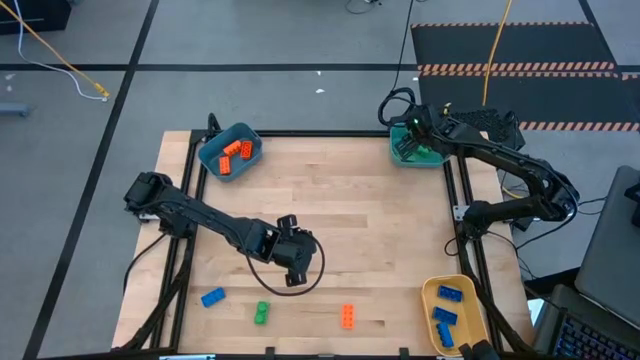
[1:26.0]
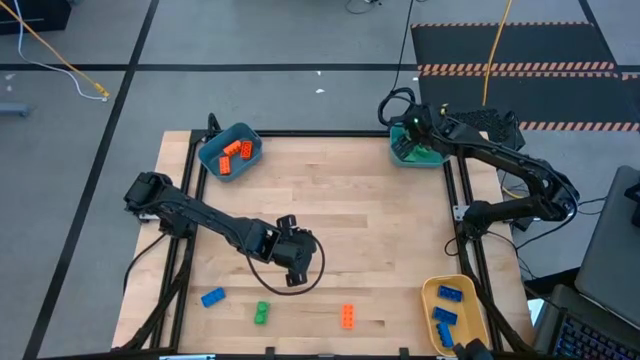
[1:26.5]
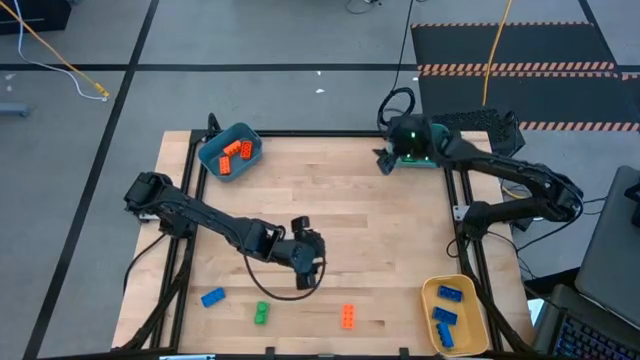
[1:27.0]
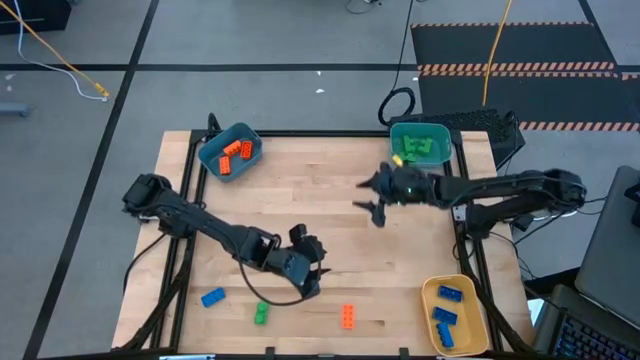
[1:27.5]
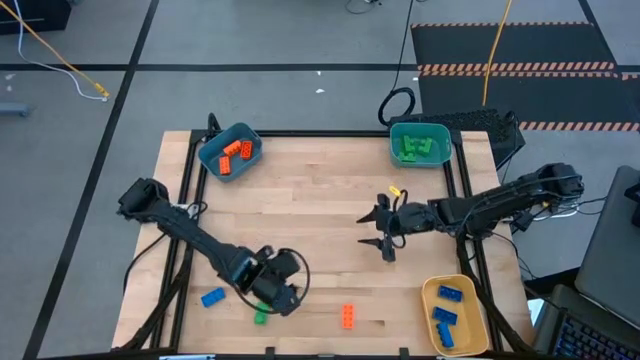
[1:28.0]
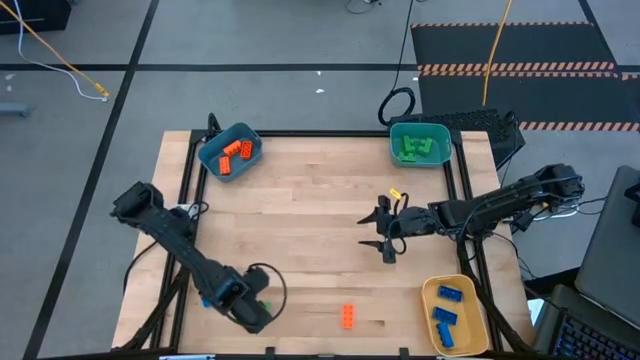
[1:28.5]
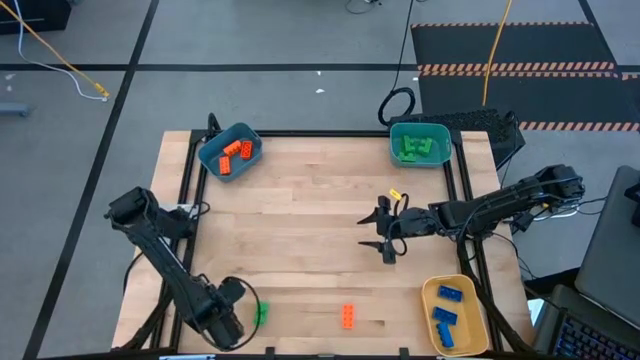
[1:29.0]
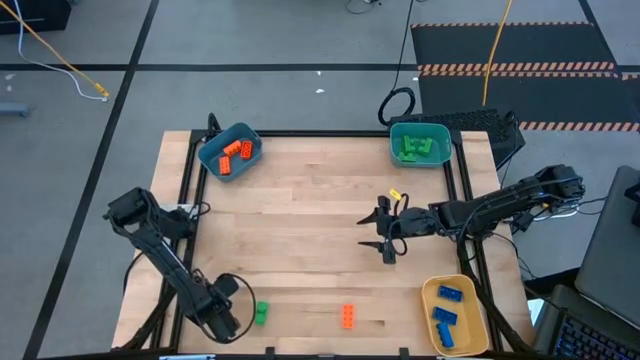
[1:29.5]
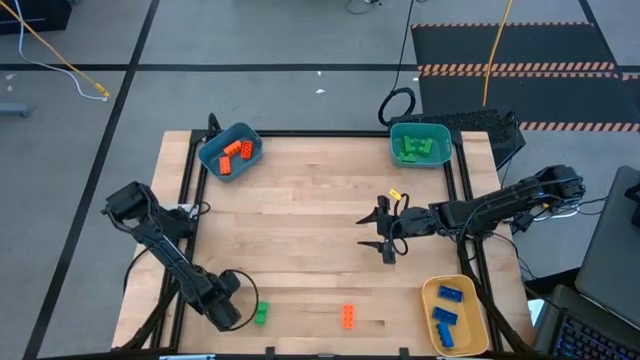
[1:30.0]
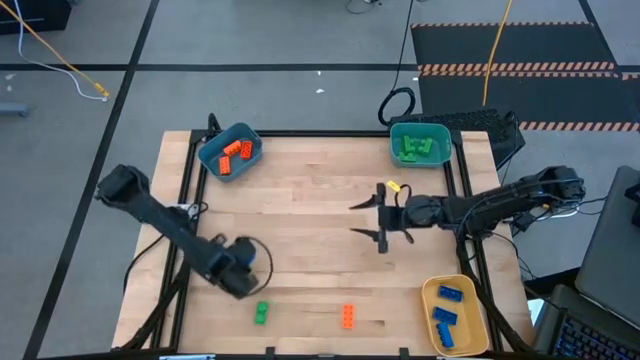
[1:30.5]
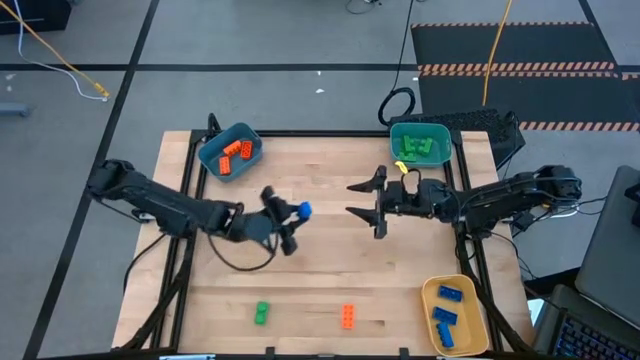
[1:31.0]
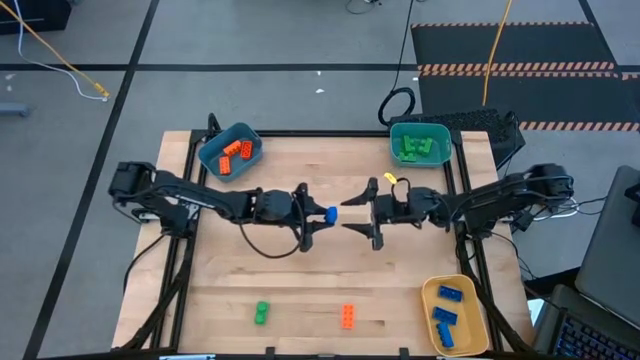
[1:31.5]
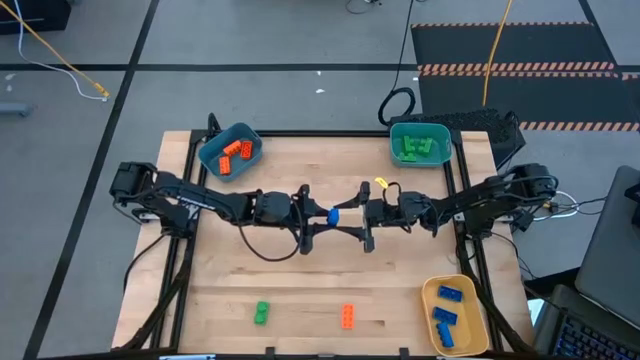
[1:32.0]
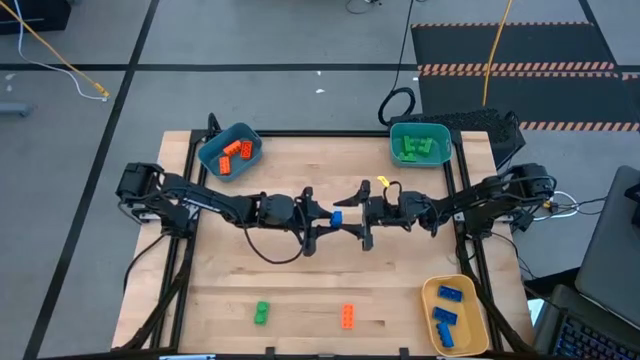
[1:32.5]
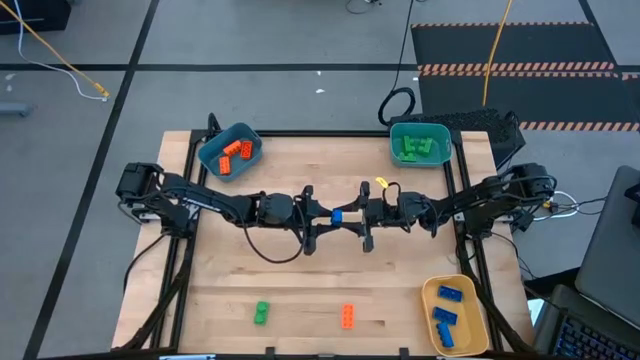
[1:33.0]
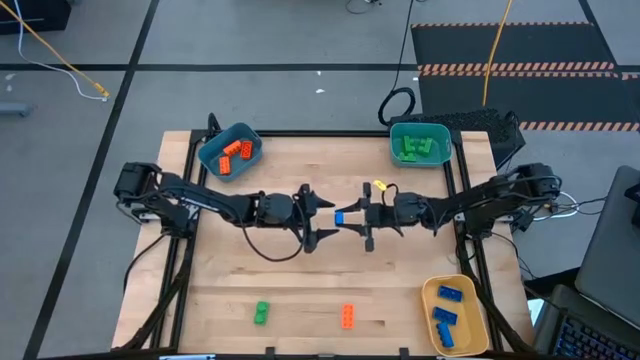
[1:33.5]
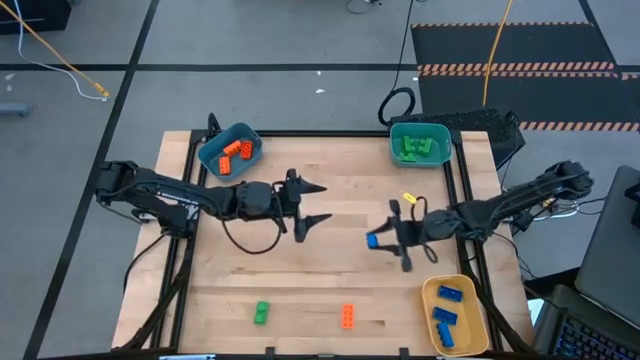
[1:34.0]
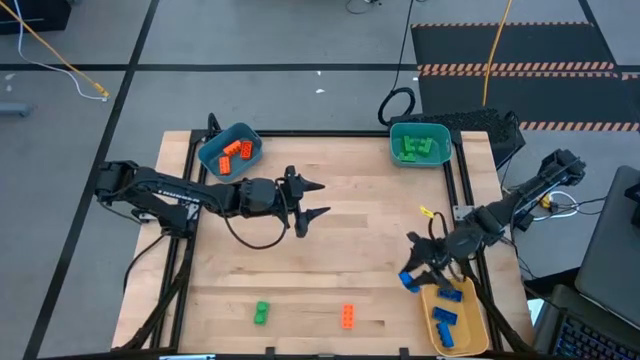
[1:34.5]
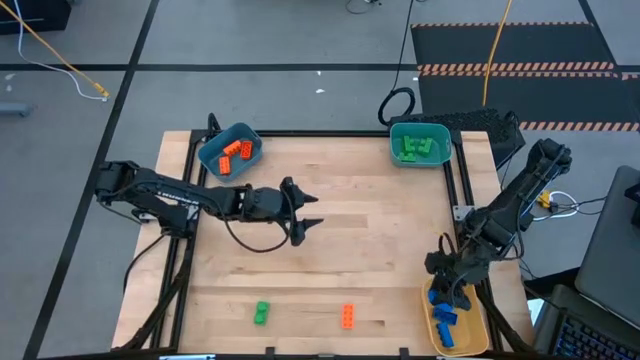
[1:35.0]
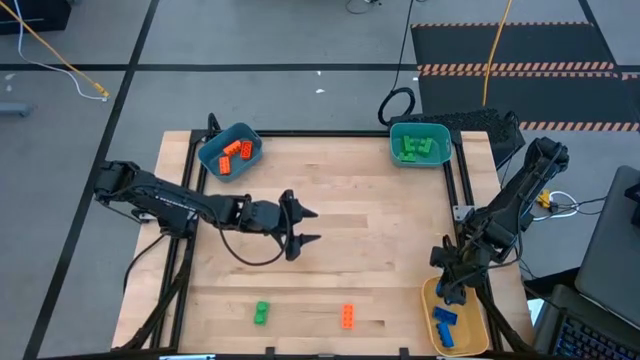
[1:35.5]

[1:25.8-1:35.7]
Task: Sort & place blocks by color
Put the blue game piece into the yellow bin

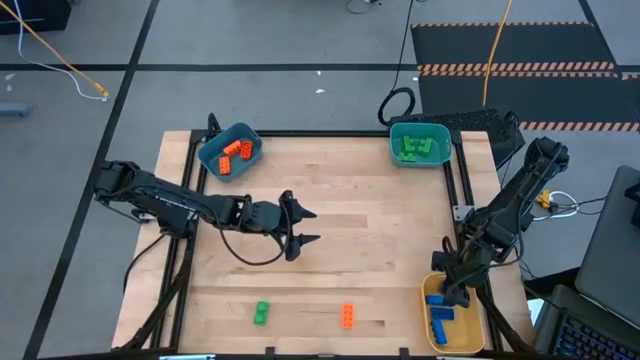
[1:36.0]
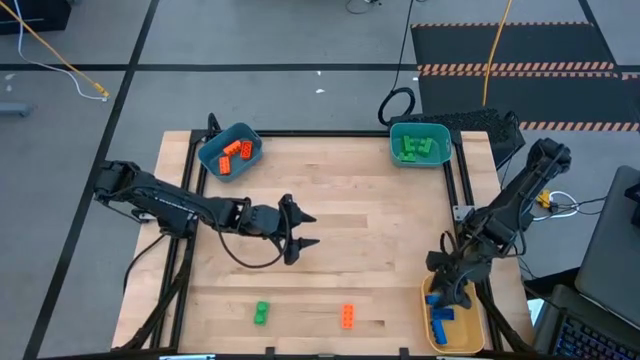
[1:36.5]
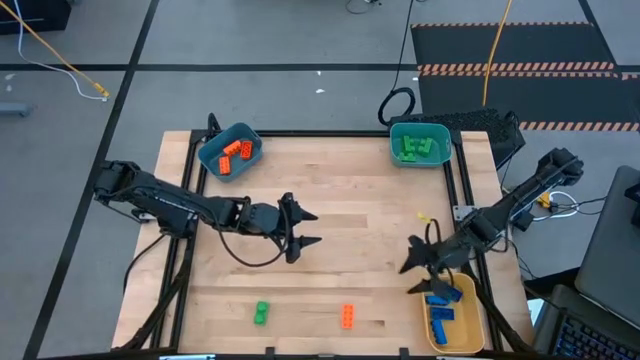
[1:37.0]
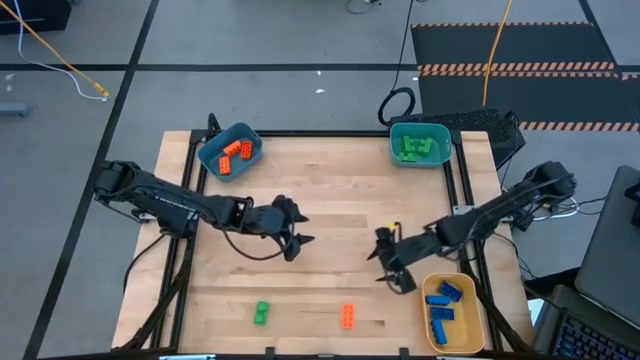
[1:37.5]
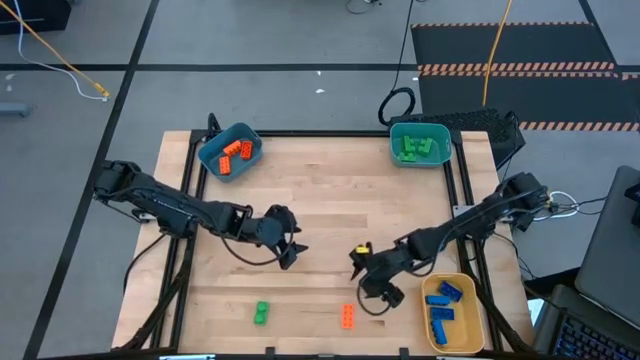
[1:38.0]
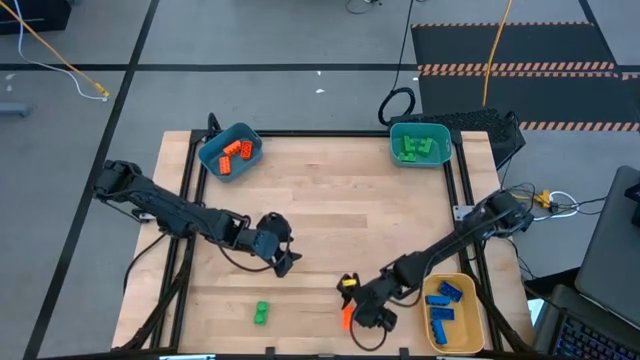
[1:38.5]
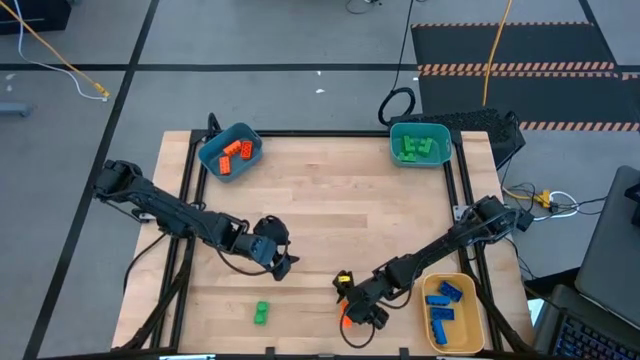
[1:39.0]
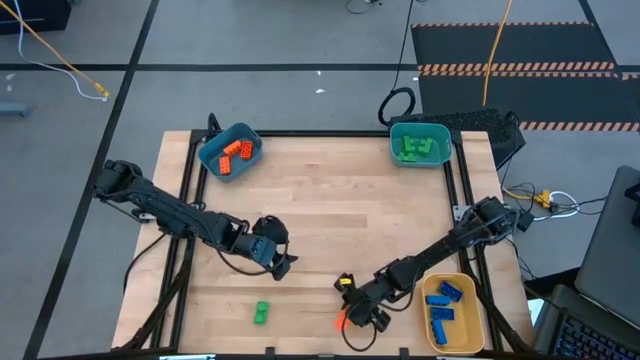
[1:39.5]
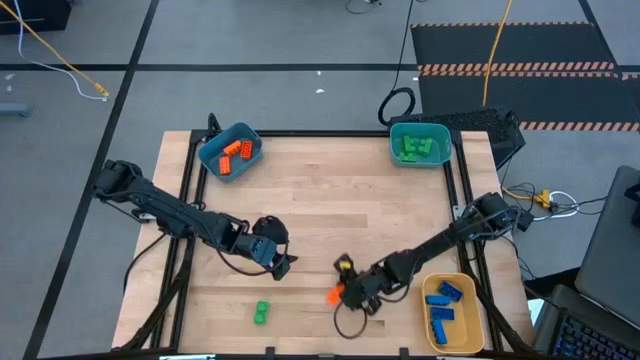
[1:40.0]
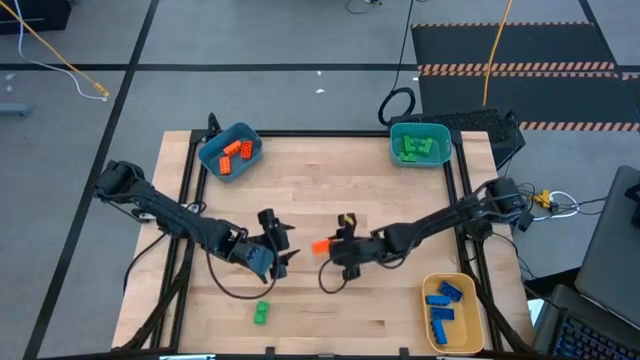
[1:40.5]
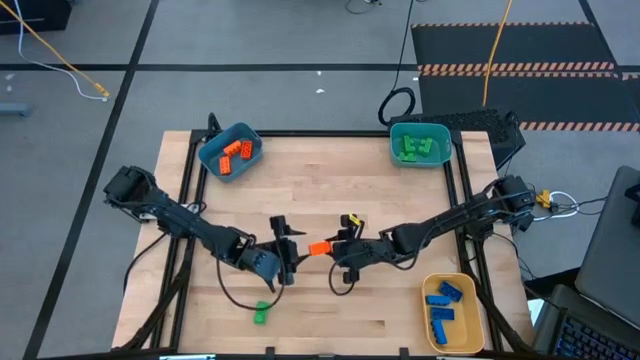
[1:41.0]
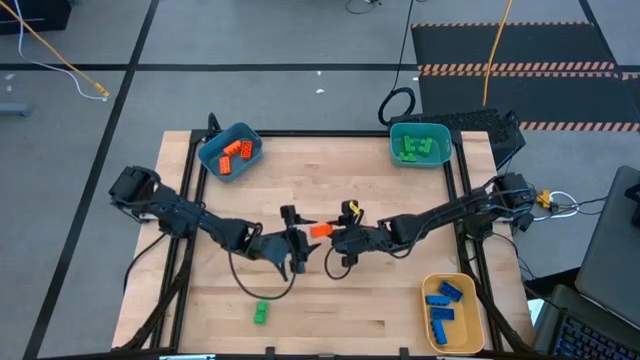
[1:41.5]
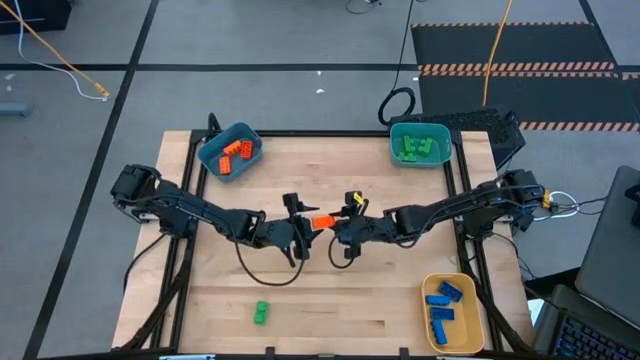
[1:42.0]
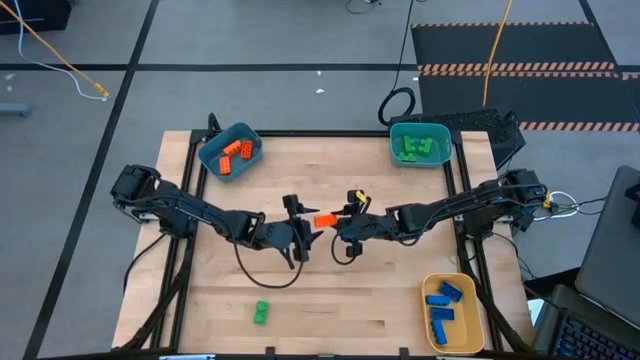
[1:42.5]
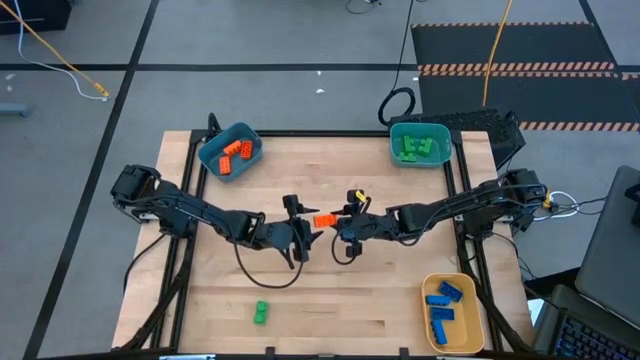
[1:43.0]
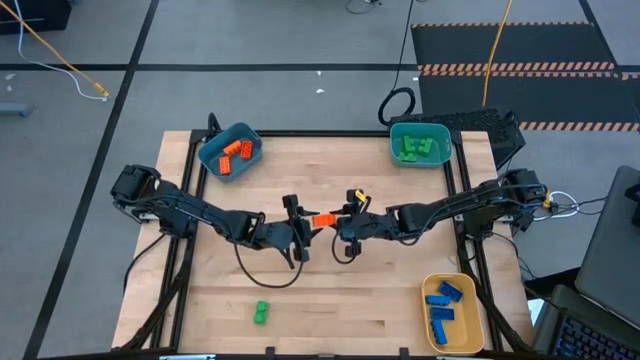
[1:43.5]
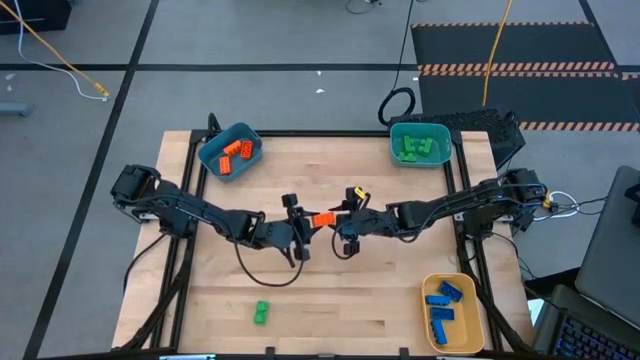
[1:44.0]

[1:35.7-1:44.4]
Put the orange game piece into the dark blue bin

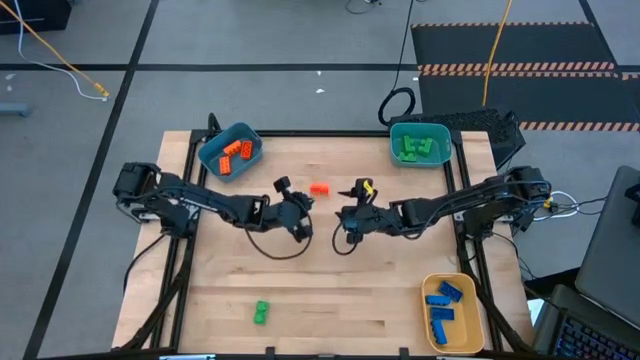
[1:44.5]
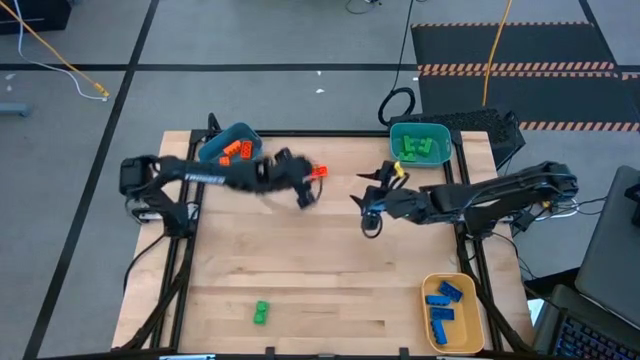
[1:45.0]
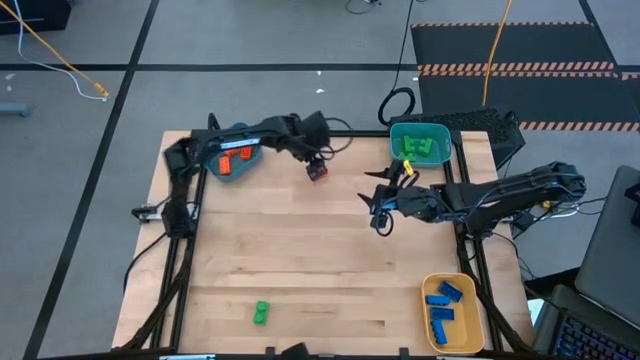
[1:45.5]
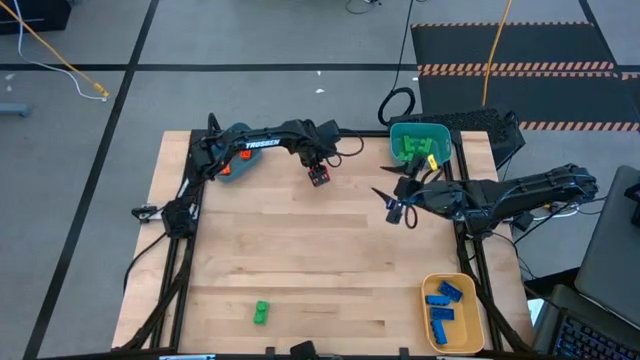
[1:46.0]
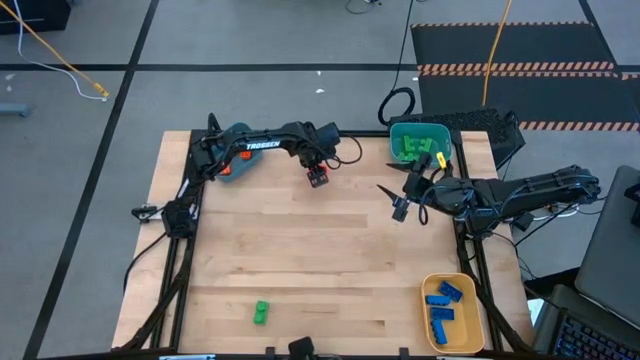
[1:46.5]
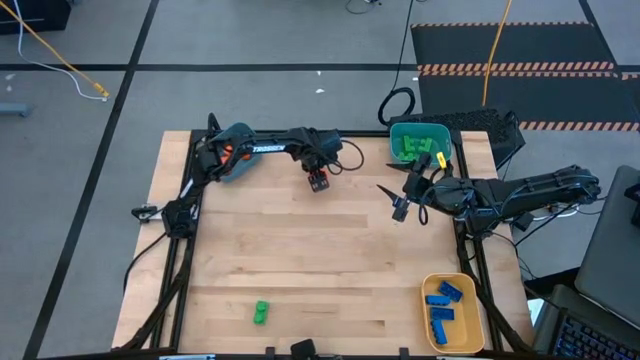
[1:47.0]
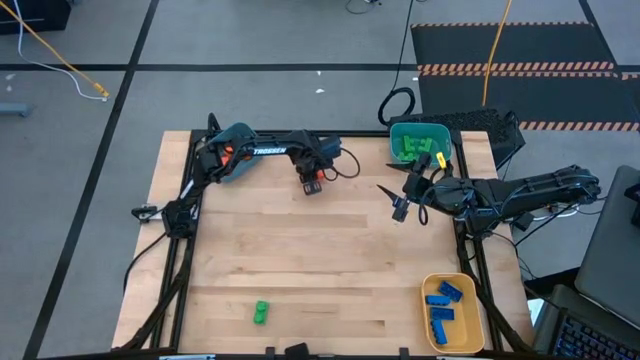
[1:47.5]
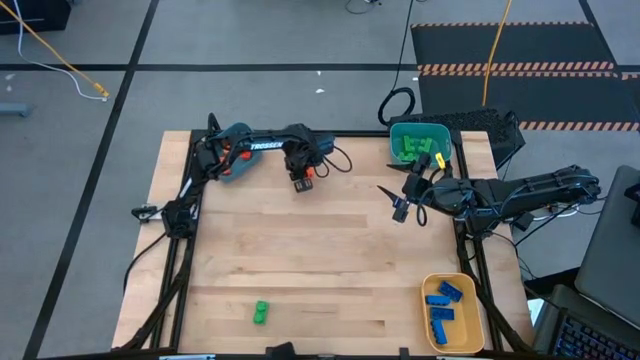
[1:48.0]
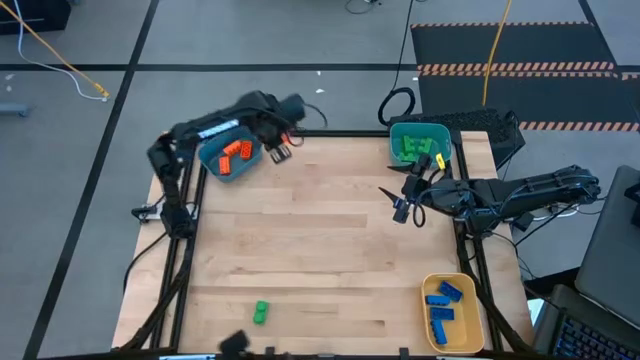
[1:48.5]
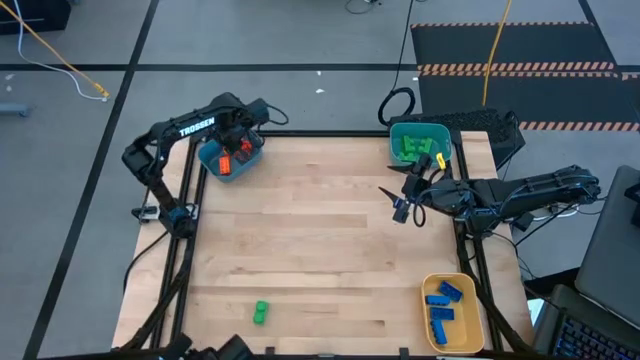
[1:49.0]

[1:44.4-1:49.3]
Put the orange game piece into the dark blue bin
